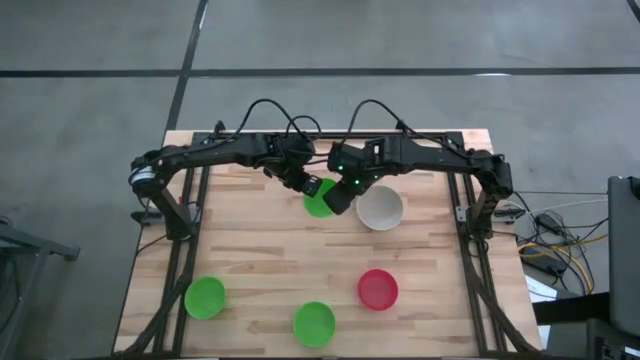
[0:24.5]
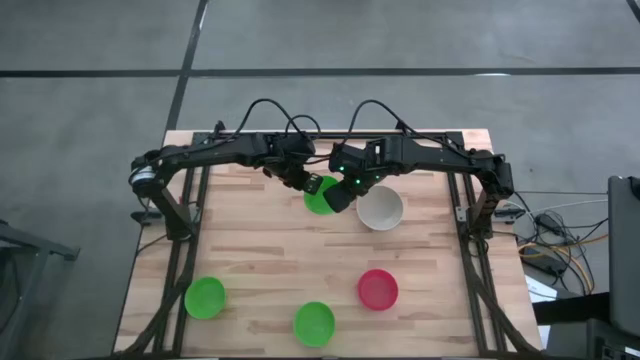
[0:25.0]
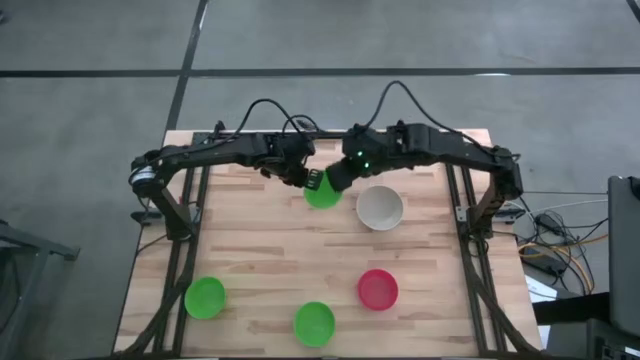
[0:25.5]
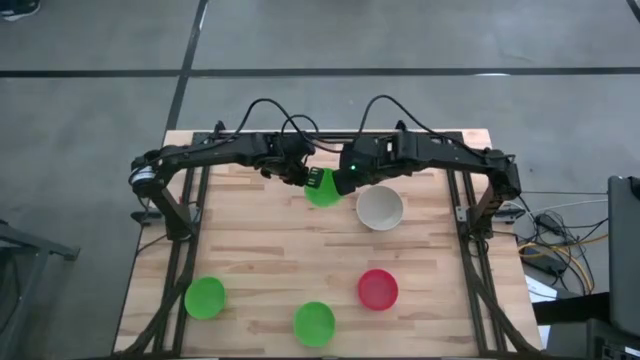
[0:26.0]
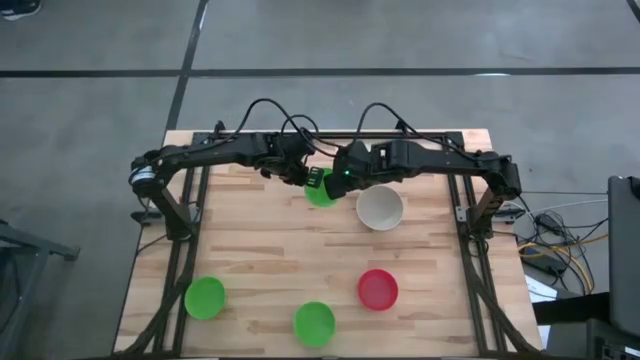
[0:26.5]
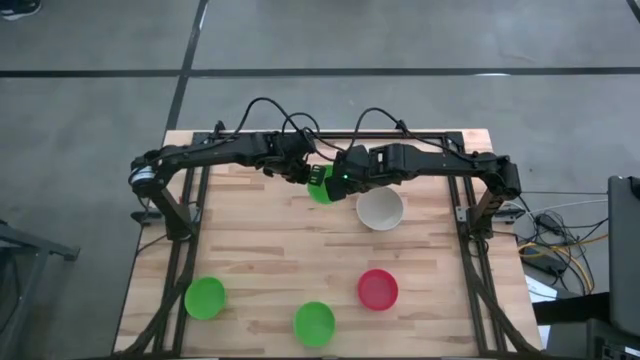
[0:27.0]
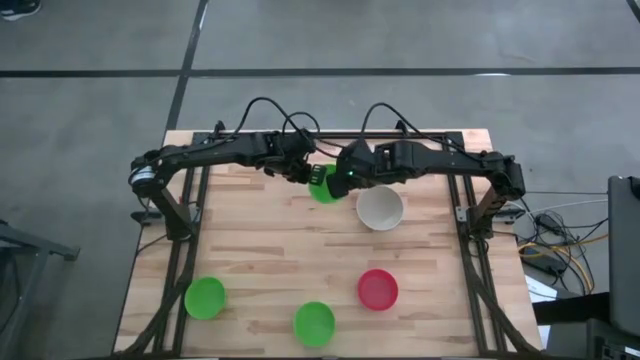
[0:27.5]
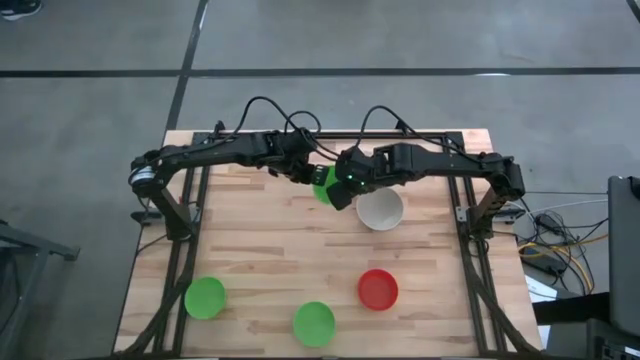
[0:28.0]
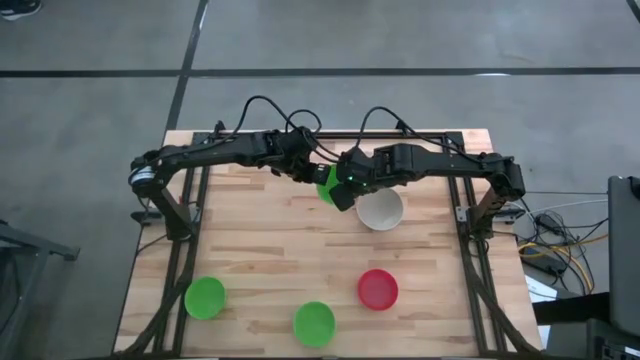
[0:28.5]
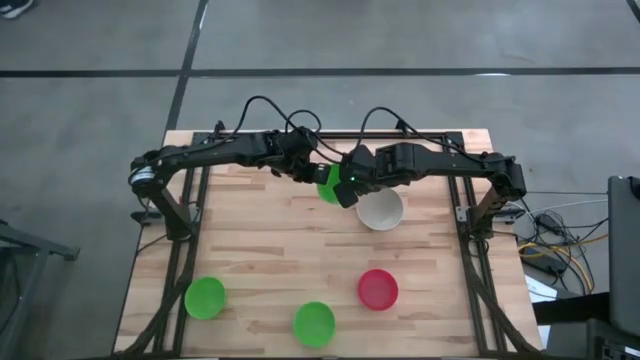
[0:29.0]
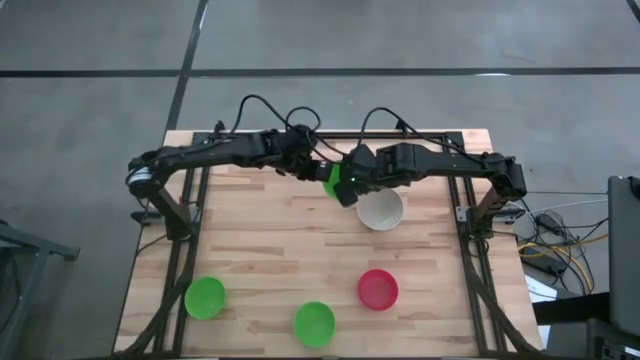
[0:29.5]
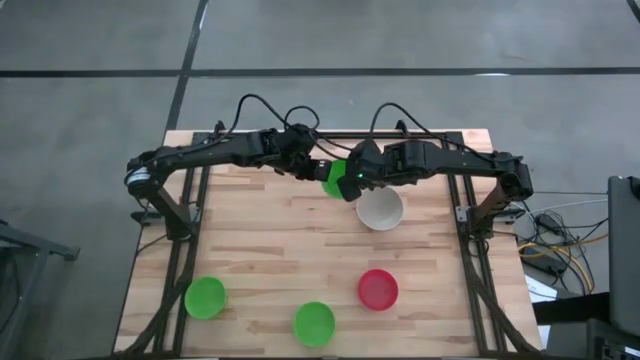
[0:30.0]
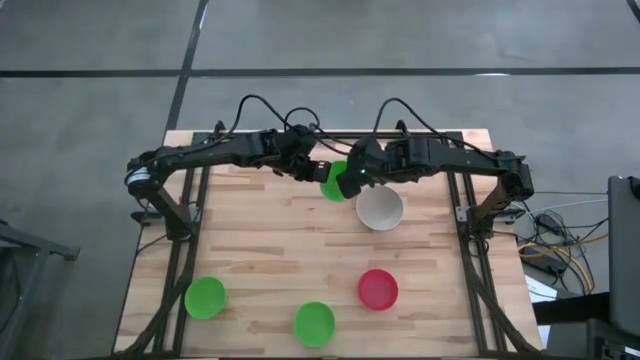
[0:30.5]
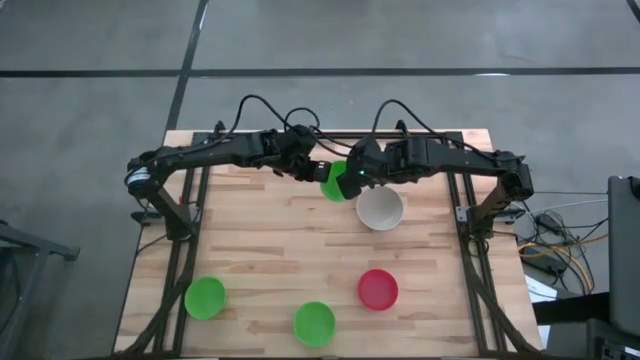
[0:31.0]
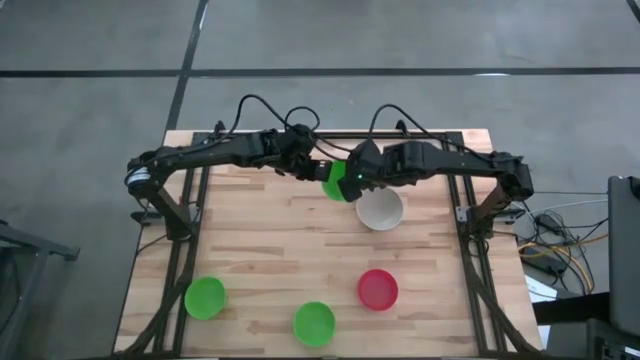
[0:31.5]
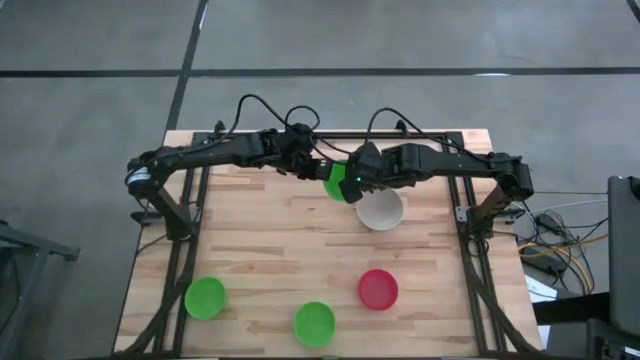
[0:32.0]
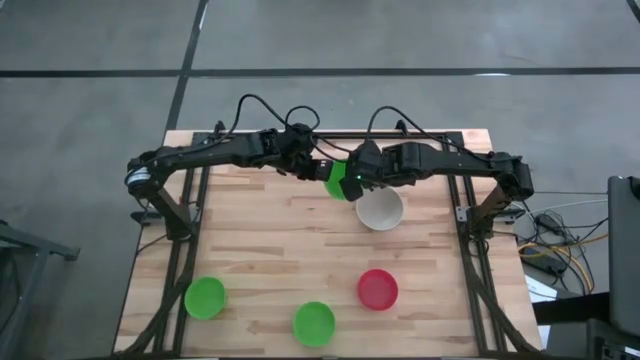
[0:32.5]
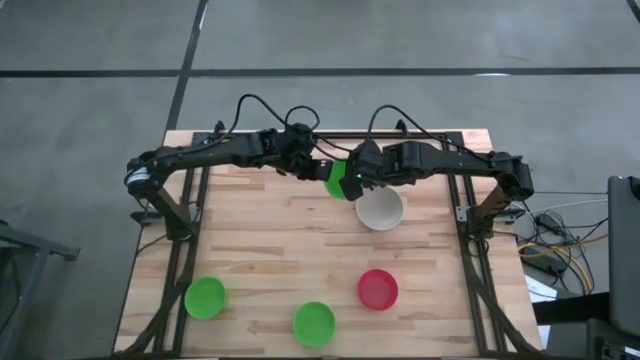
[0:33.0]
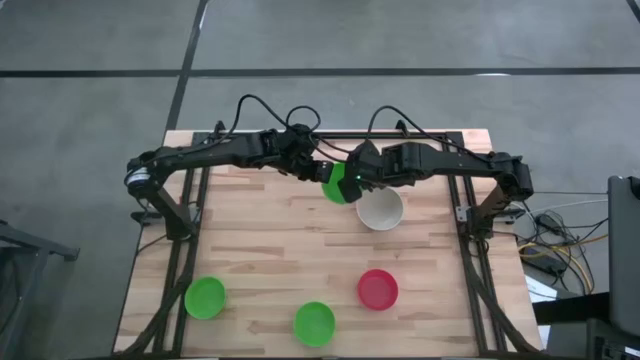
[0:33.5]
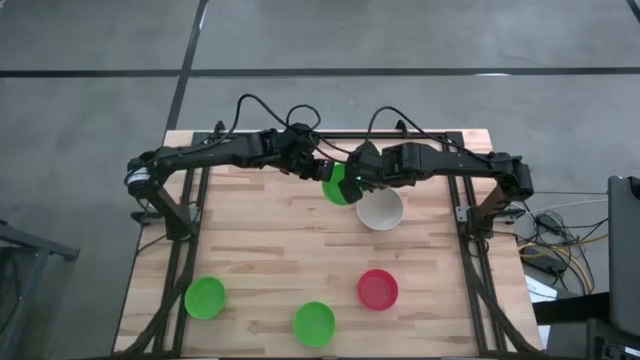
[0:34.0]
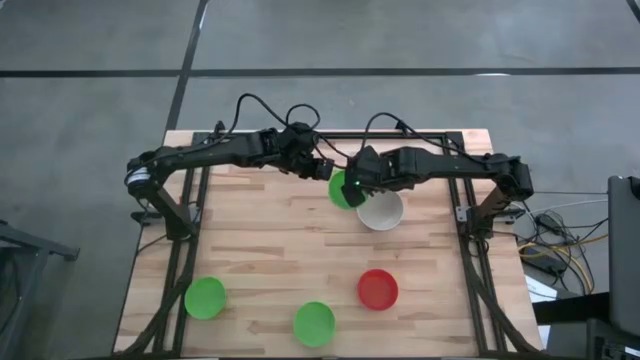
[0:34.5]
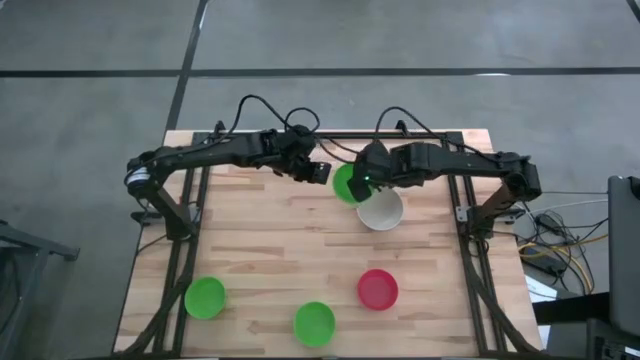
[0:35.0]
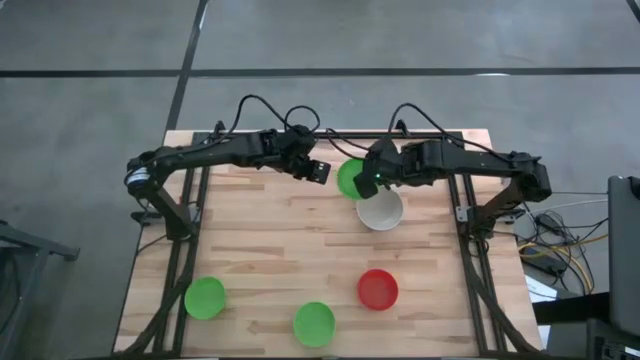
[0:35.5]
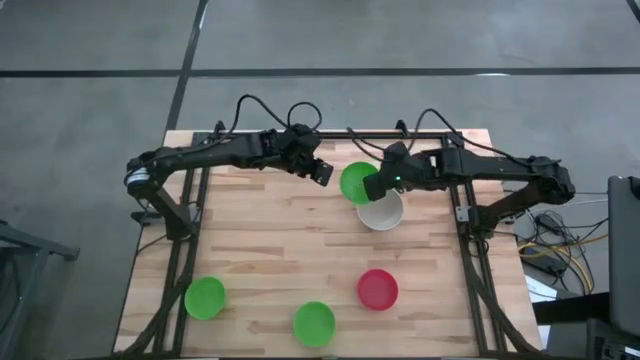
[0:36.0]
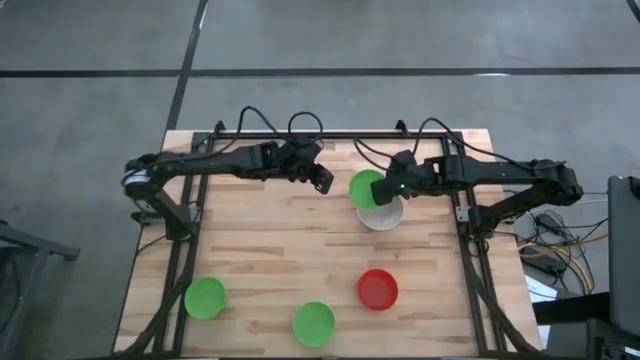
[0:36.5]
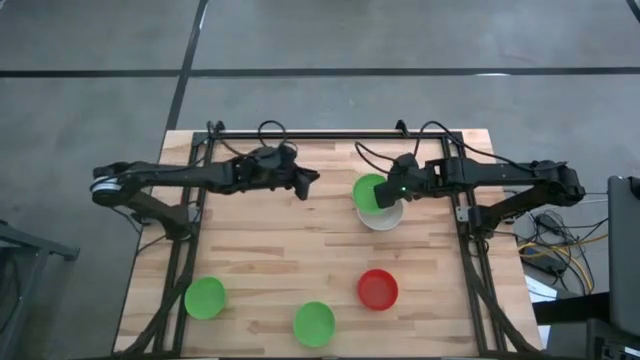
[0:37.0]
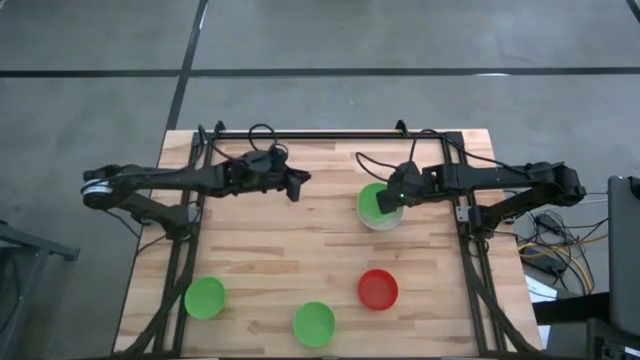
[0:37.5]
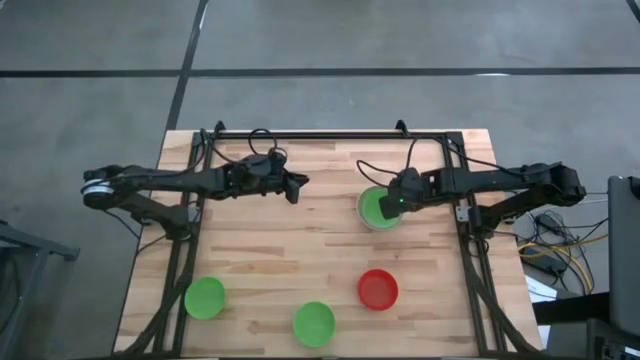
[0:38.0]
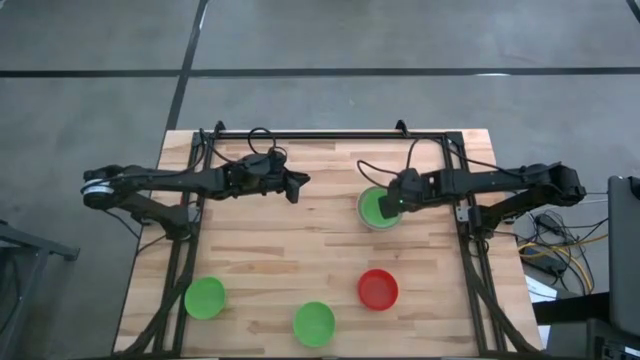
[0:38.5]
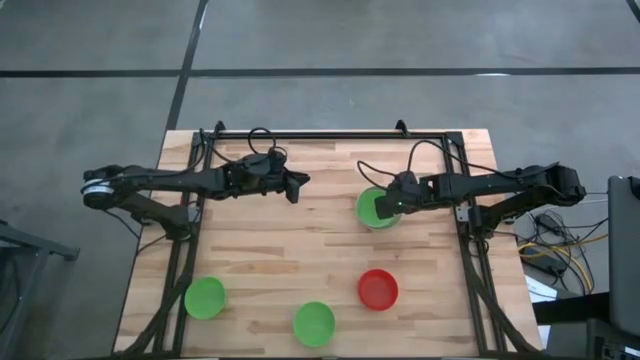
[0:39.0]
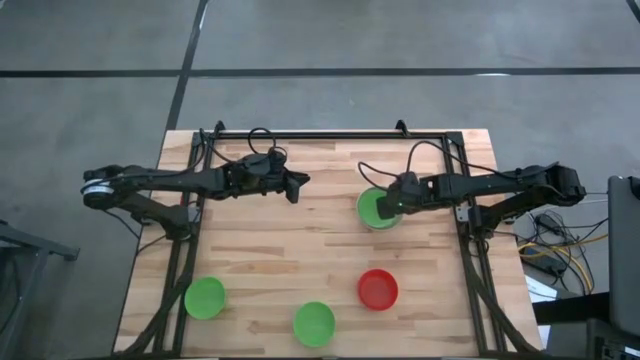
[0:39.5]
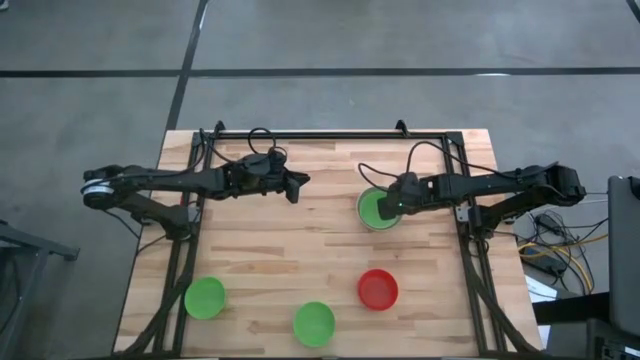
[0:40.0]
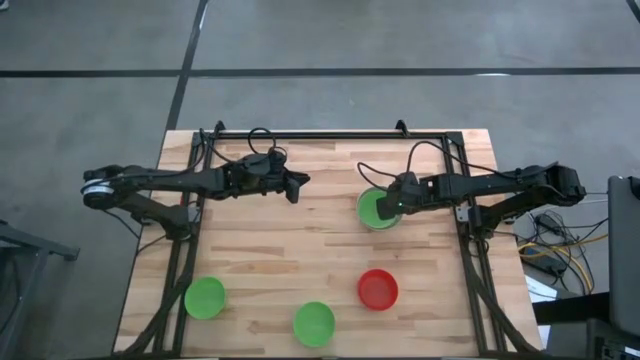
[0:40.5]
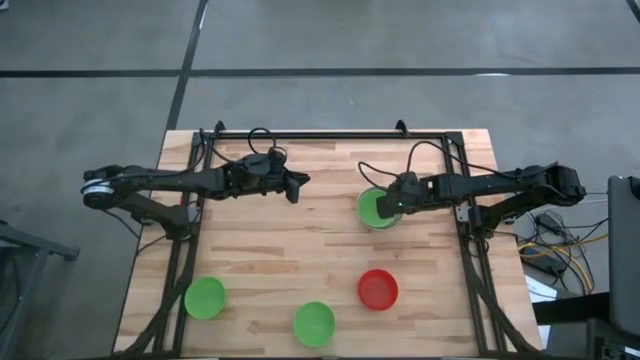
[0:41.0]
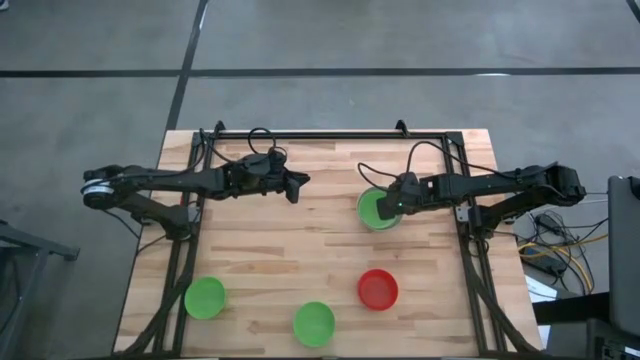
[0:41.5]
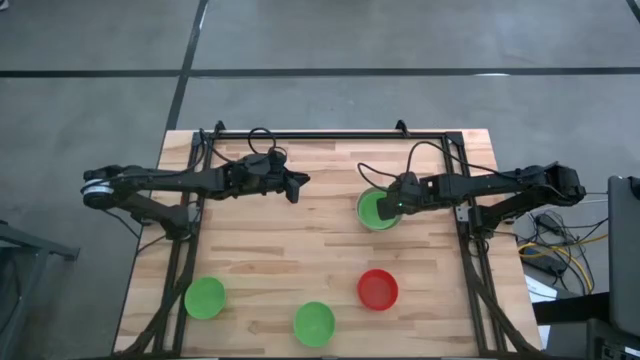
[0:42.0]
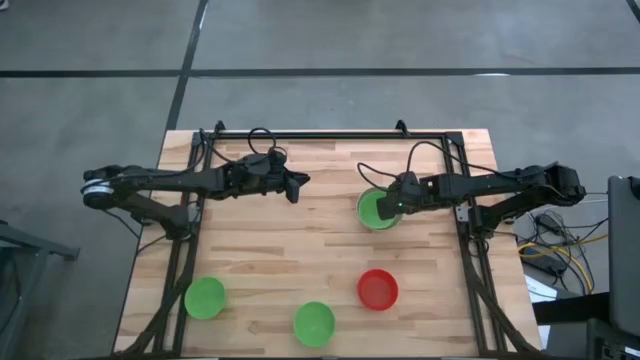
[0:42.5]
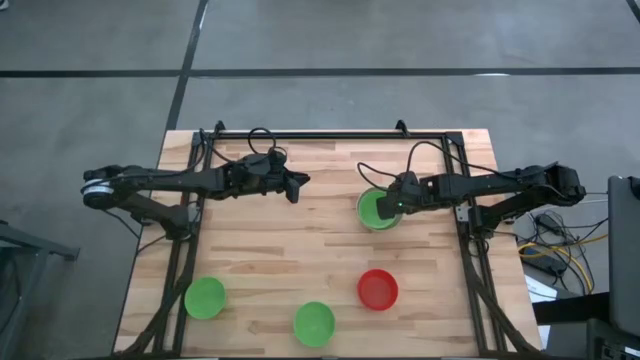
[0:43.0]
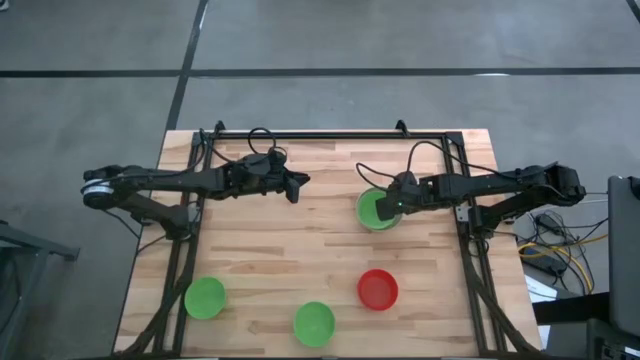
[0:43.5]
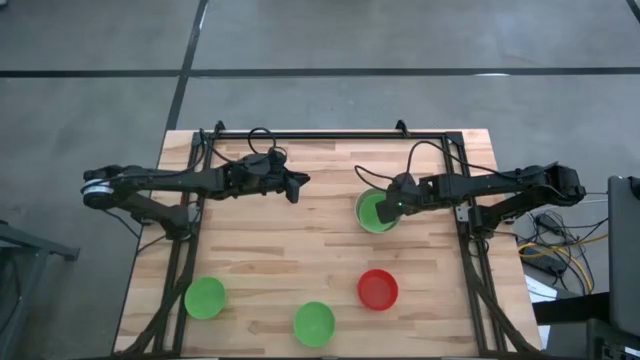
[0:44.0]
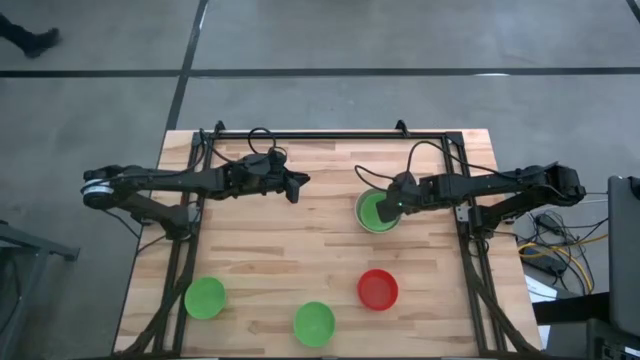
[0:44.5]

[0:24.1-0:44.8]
Stack the top green bowl on the grey bowl
